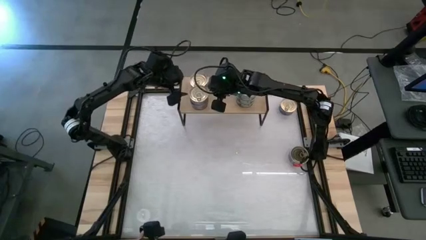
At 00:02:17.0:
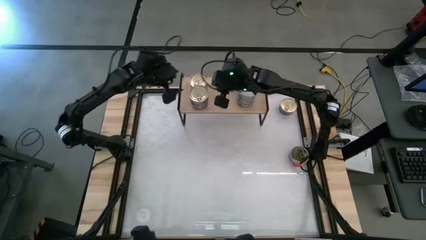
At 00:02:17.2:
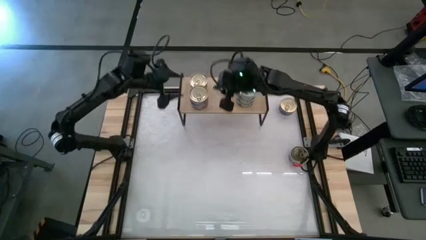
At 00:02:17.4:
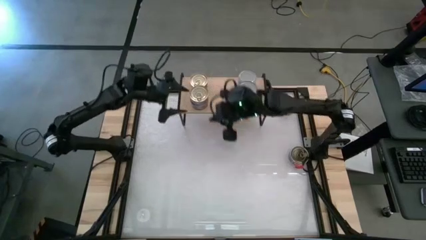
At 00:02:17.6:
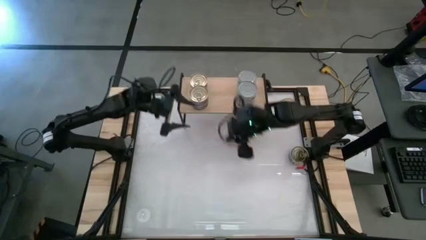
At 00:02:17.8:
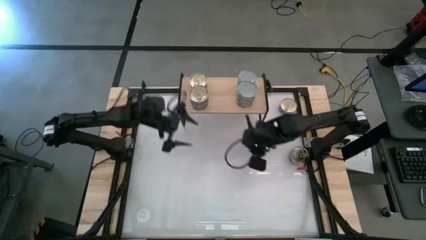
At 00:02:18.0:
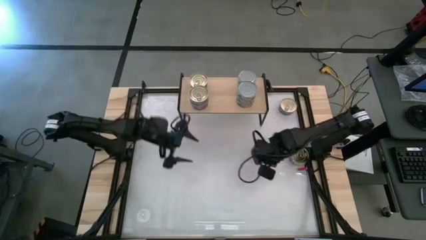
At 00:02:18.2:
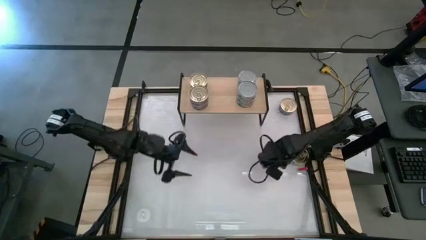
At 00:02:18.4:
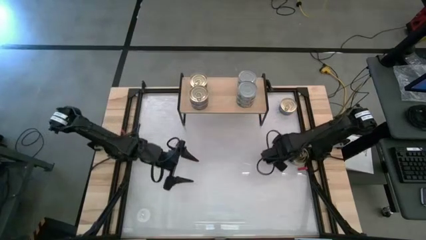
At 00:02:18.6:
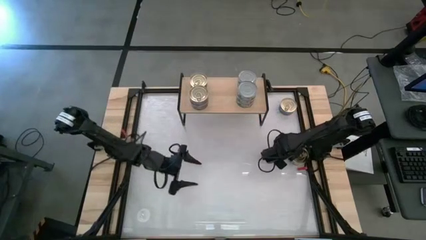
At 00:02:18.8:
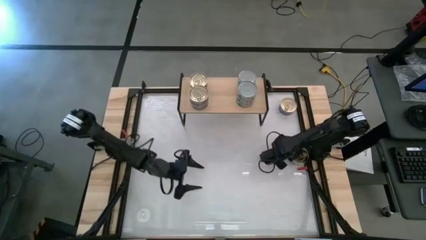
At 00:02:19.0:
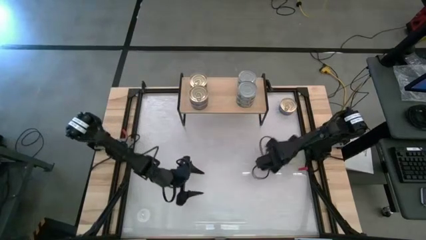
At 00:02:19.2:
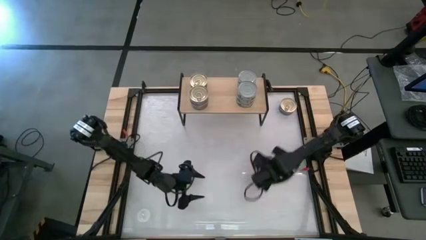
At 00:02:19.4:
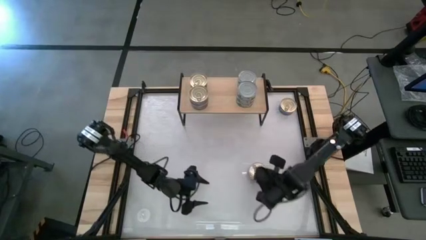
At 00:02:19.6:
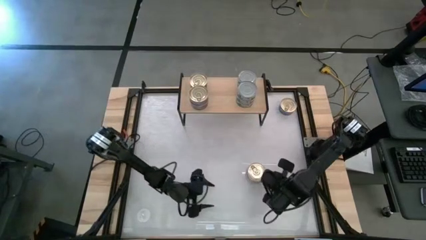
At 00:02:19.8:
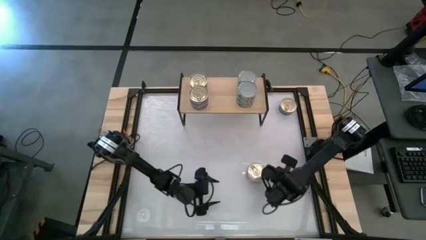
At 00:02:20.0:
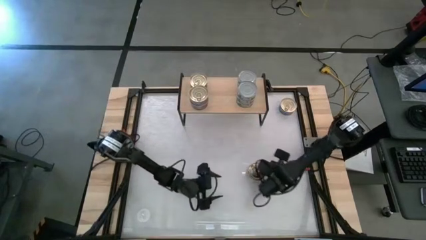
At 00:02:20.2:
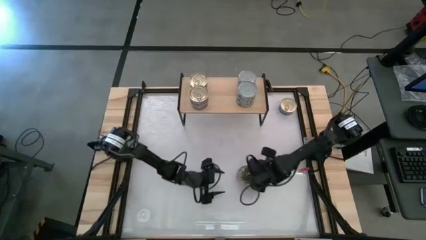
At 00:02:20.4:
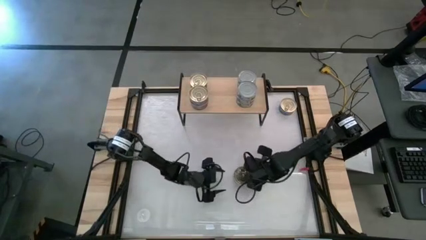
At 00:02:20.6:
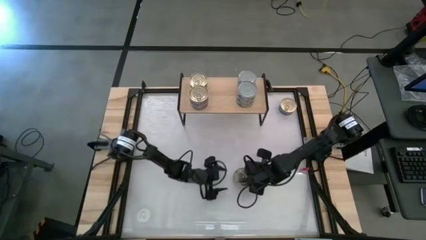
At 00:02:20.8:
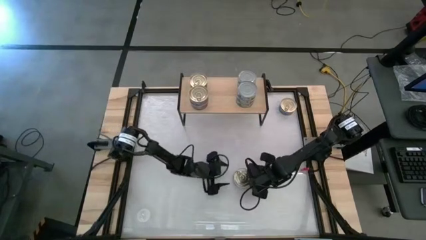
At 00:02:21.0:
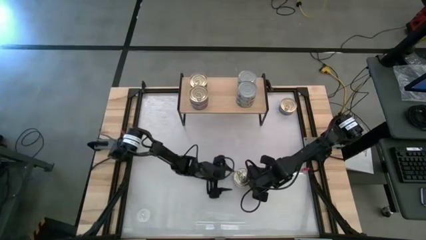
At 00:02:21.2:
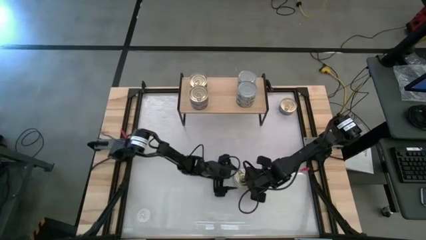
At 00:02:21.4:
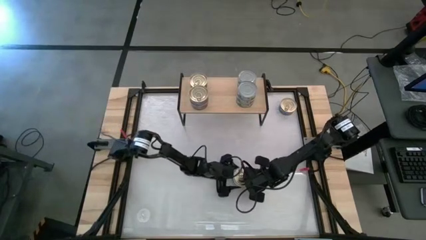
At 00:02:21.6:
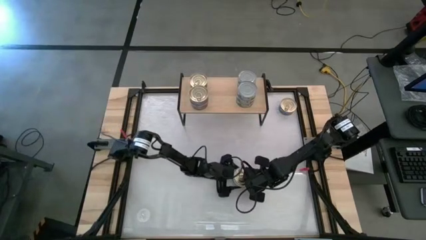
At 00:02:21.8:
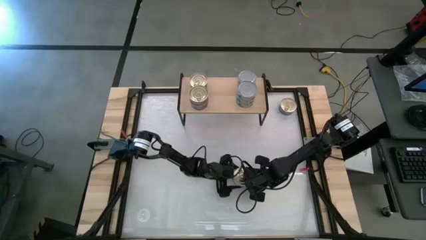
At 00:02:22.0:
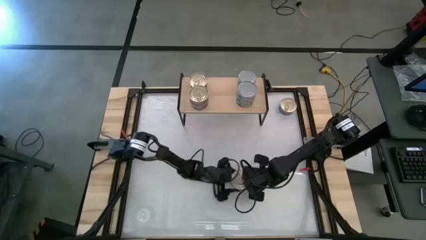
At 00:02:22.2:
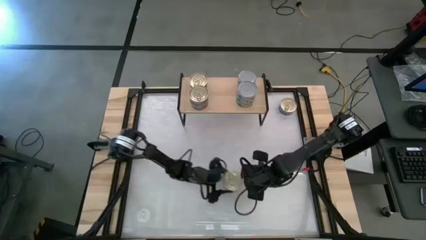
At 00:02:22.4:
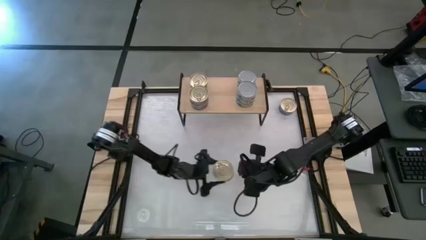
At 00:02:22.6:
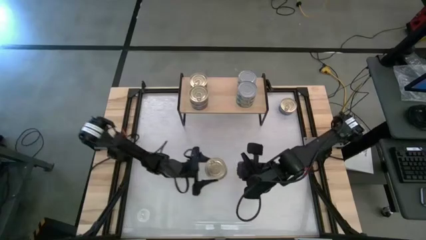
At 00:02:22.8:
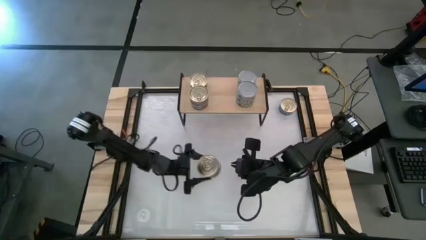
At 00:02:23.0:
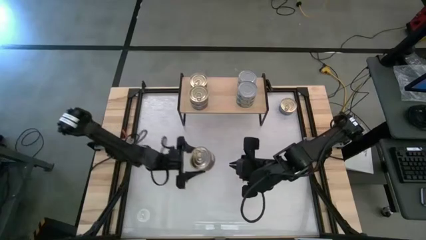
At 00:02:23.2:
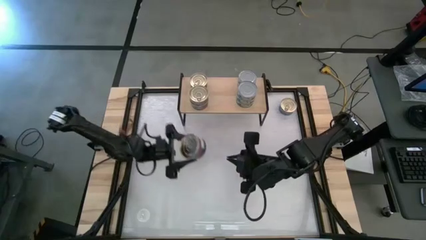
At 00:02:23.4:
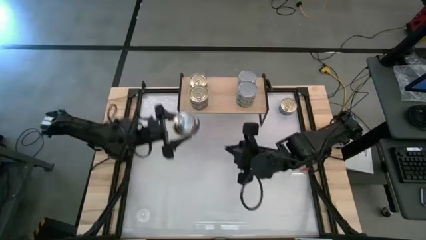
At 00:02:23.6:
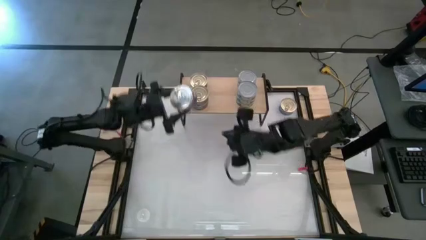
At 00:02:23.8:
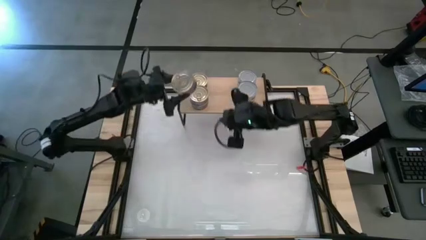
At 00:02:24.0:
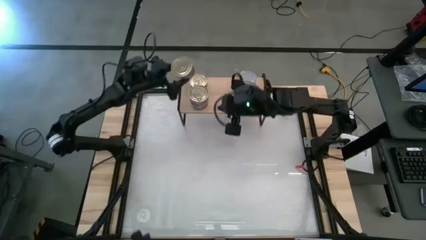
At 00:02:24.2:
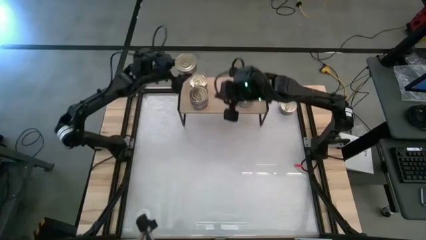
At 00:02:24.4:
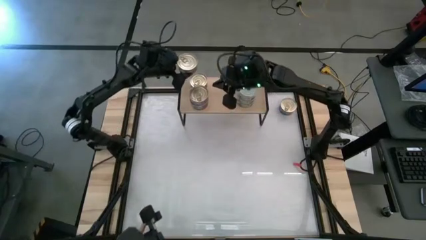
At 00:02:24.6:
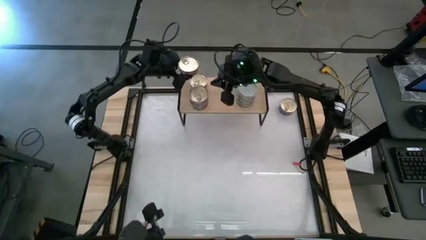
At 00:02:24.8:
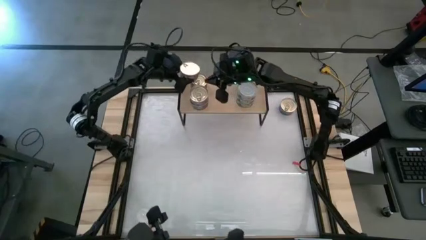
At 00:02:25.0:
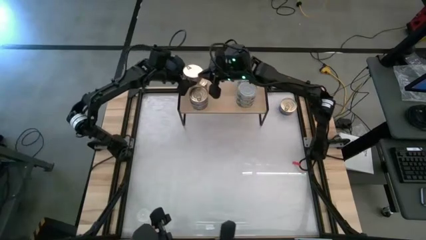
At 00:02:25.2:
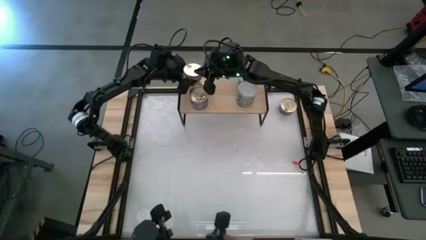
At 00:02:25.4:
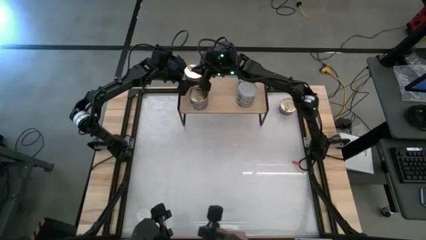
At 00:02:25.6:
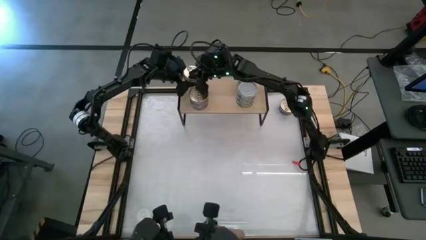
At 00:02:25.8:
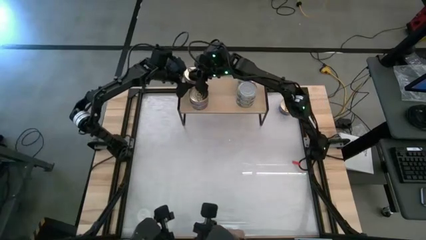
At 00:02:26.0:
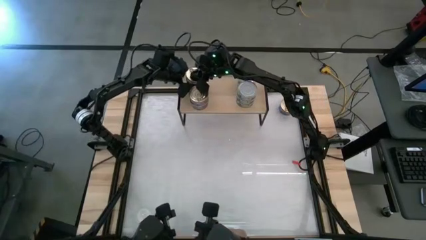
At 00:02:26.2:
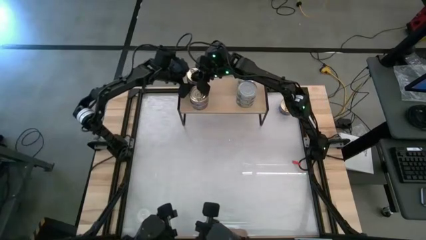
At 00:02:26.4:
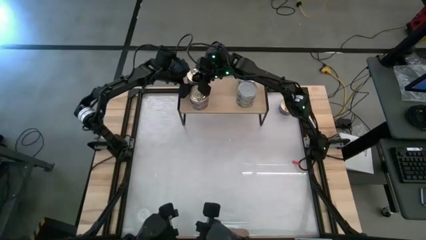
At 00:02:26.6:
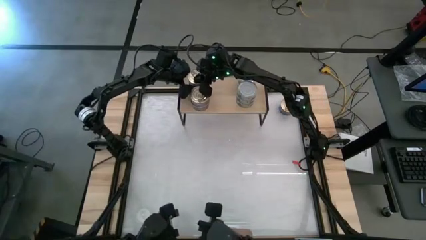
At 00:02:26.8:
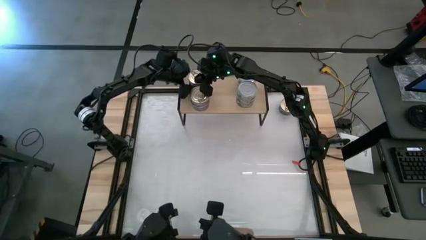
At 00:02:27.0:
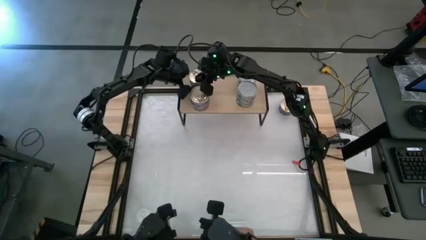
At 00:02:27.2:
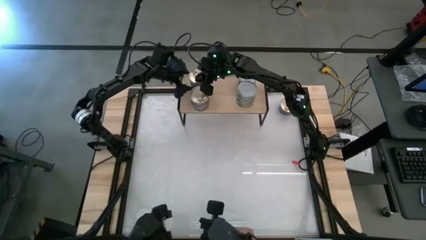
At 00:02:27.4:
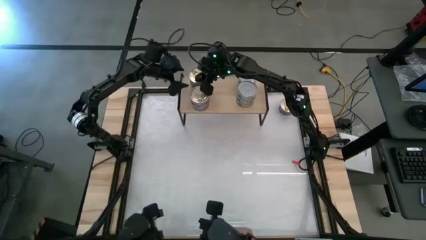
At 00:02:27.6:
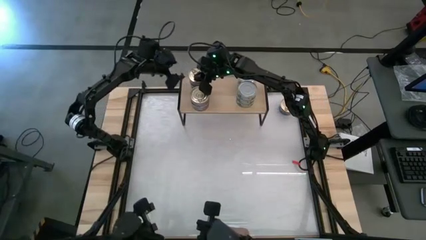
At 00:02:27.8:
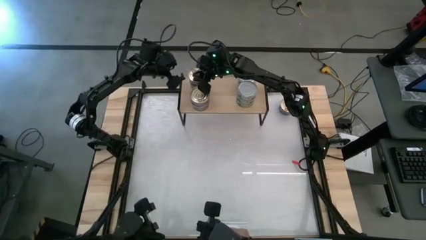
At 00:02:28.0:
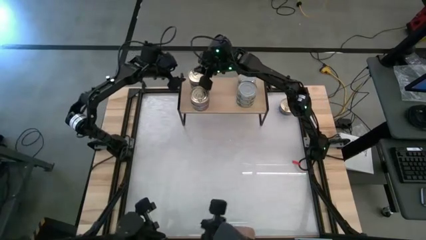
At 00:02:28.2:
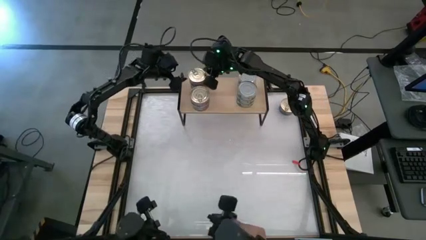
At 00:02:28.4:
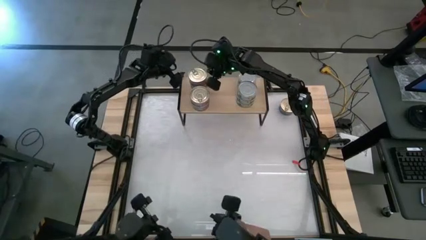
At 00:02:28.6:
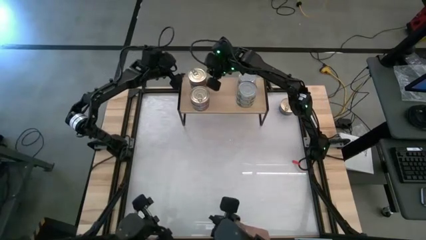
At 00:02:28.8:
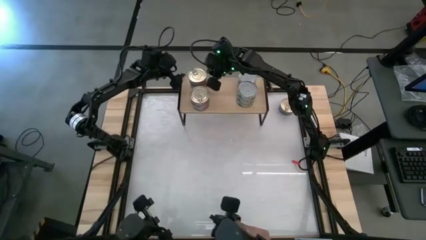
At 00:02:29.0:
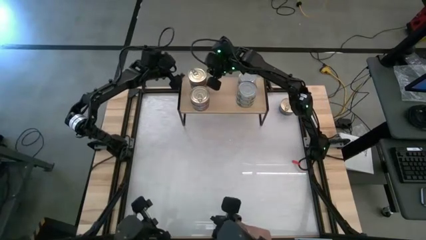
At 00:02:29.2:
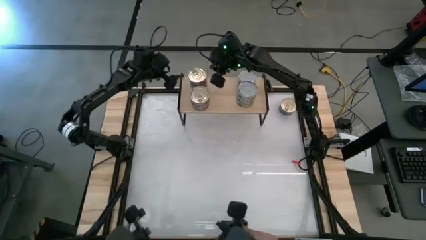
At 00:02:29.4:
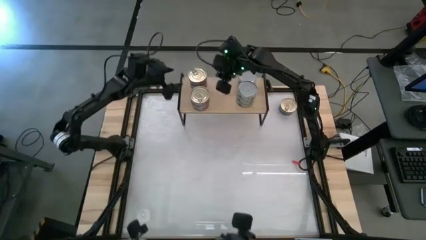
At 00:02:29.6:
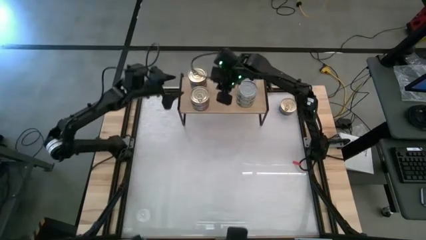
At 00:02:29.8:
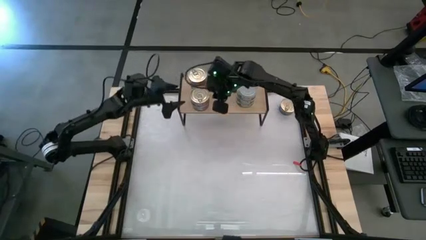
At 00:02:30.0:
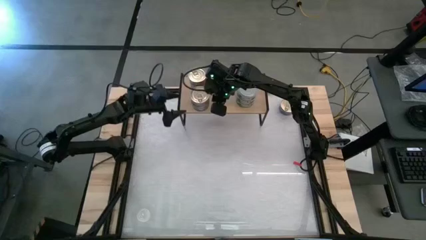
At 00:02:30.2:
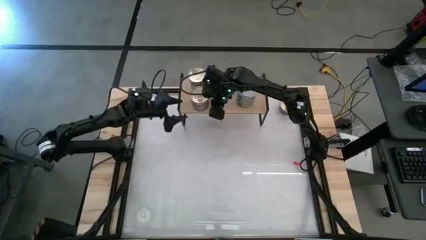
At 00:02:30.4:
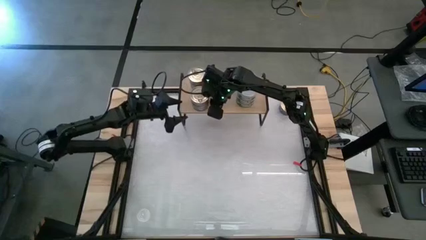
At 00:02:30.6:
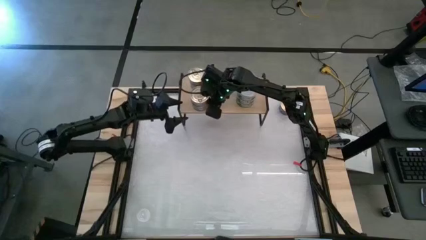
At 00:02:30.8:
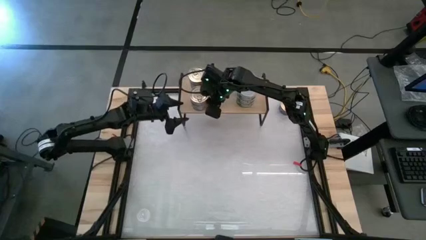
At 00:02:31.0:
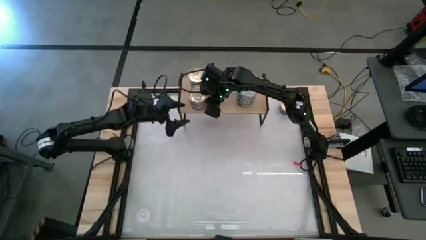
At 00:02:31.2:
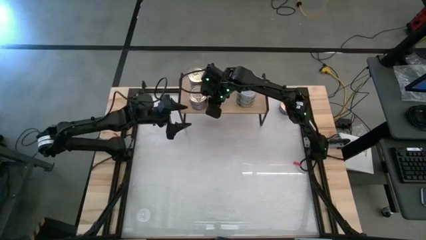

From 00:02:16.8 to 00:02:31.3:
Task: Stack canned seafood by type on shelf
Stack the bottom blue-pink tuna can on top of the blue-pink tuna can on the shelf
